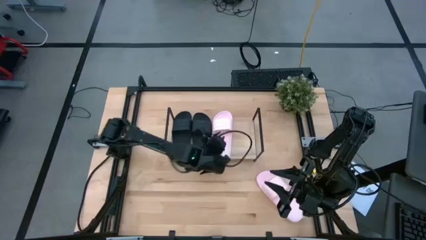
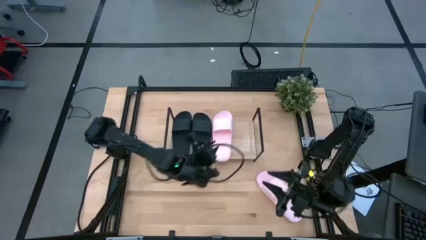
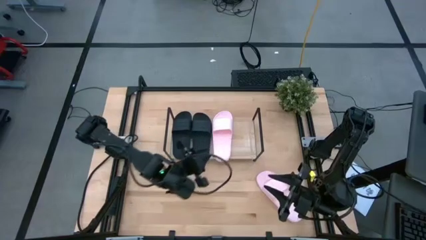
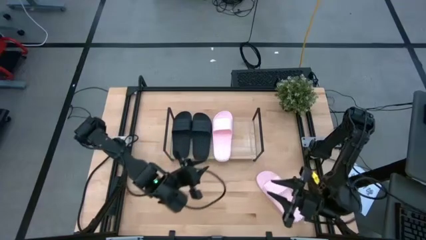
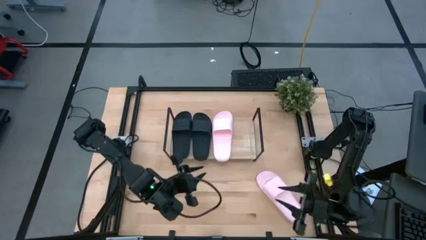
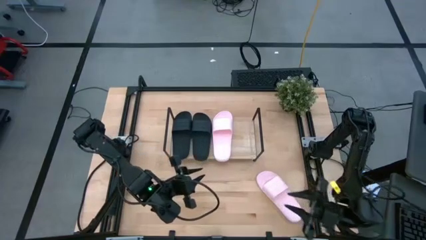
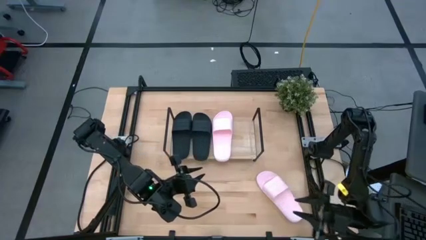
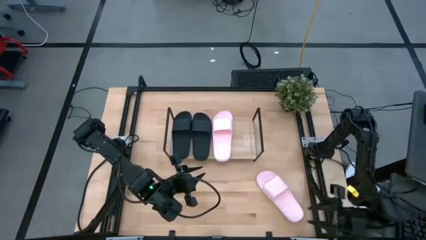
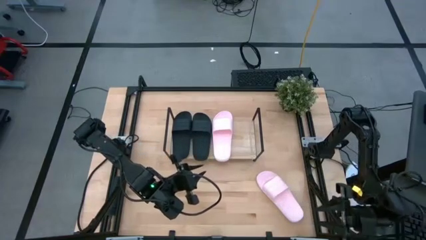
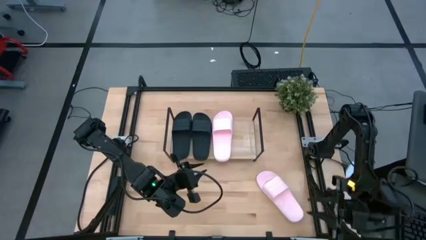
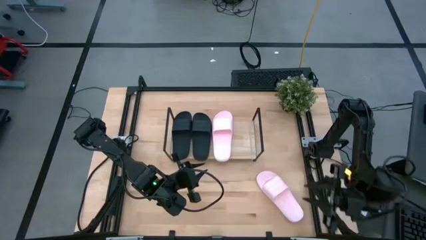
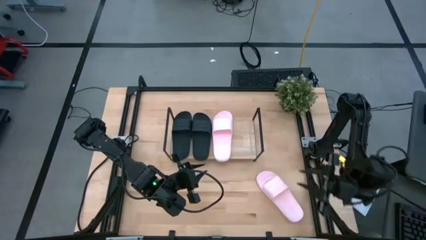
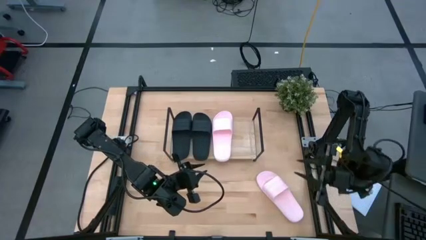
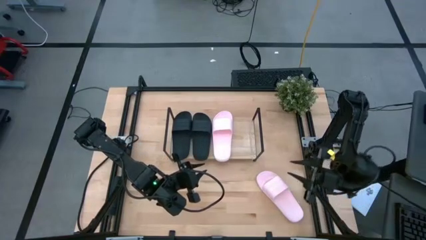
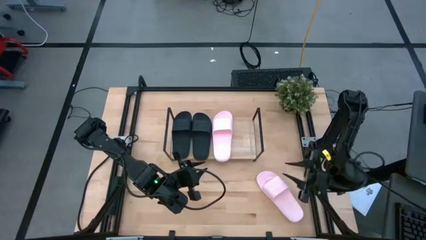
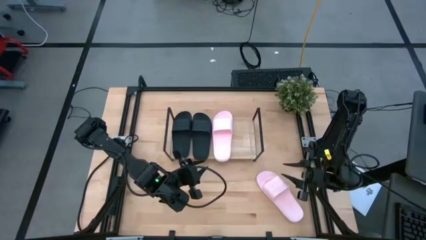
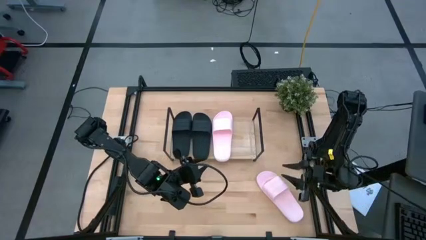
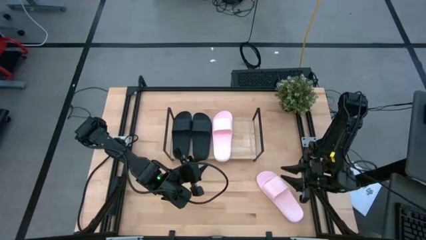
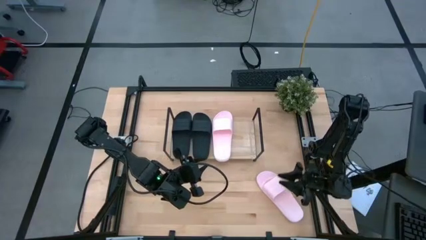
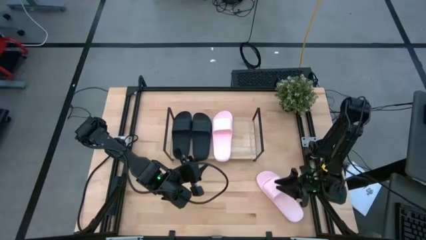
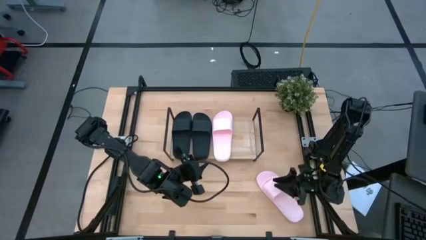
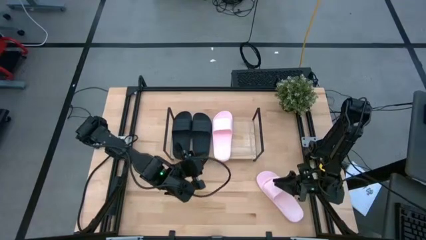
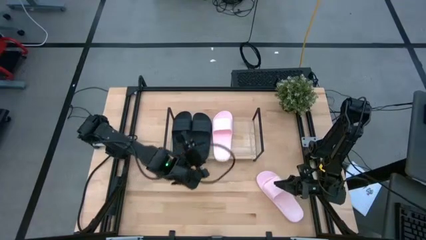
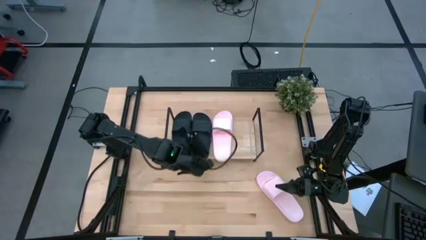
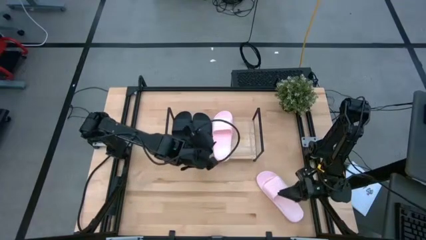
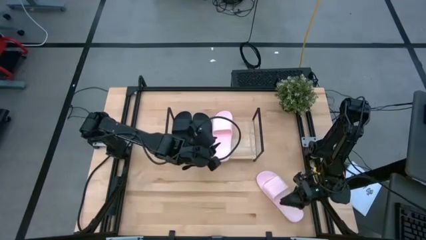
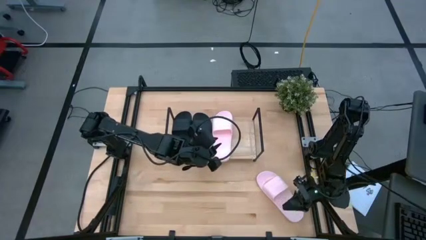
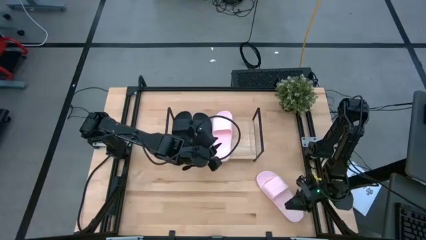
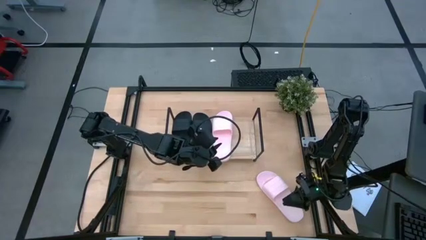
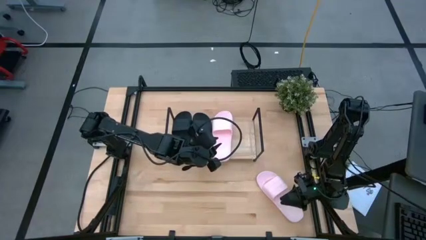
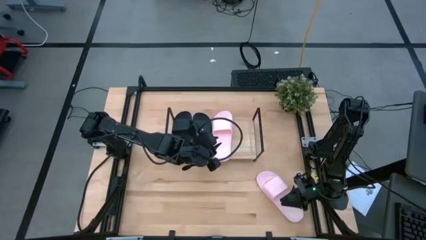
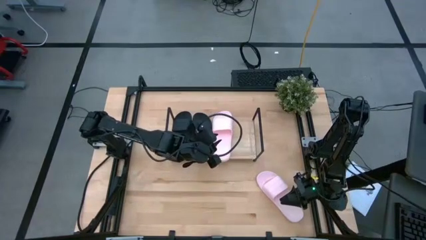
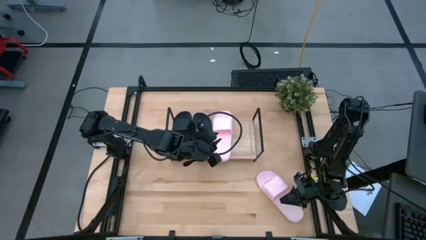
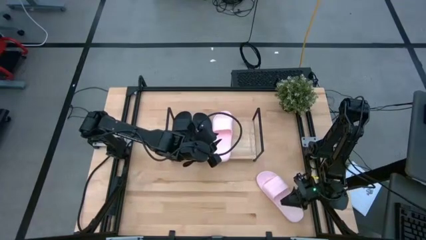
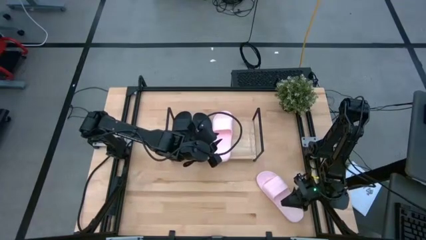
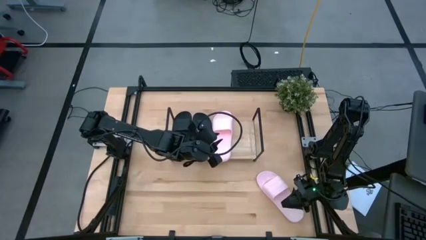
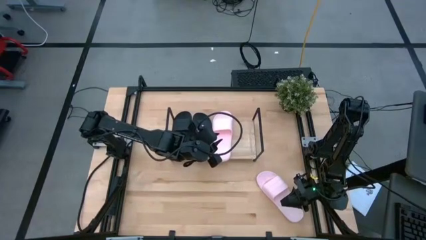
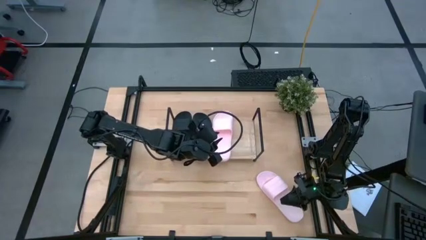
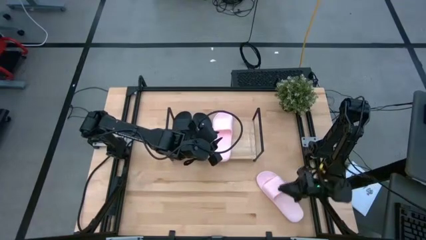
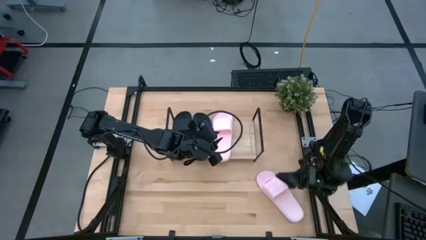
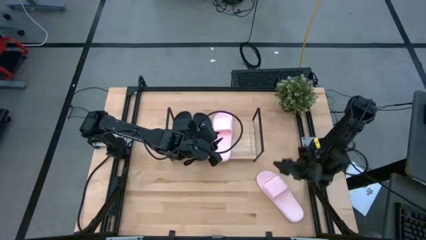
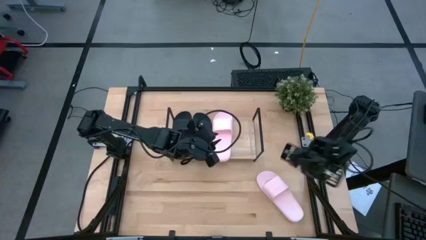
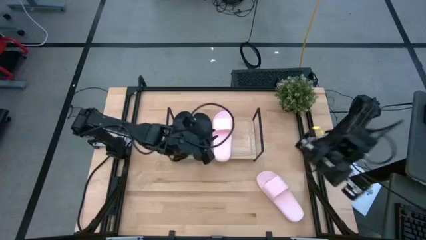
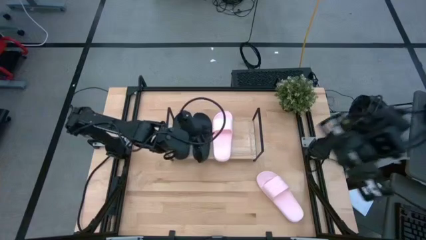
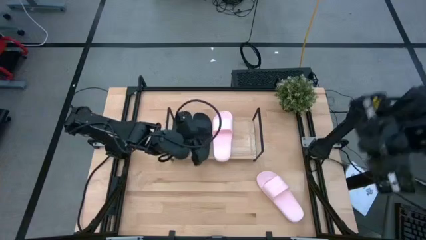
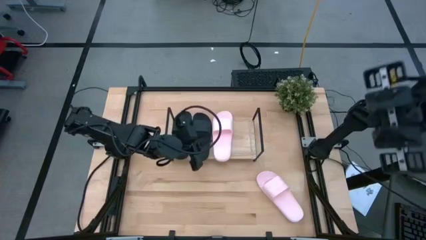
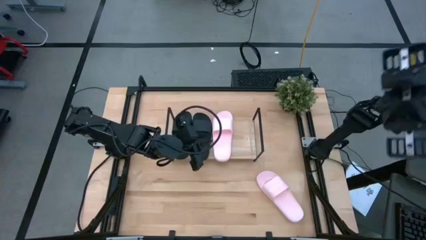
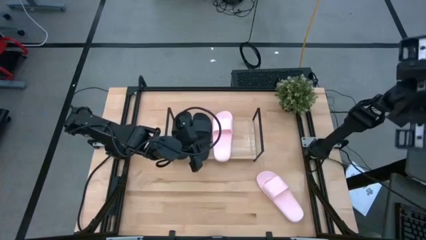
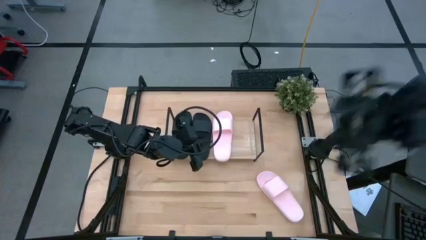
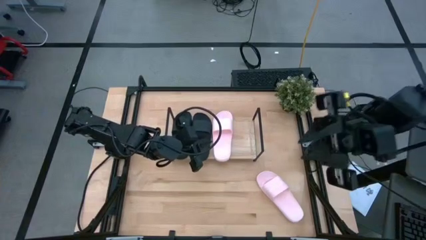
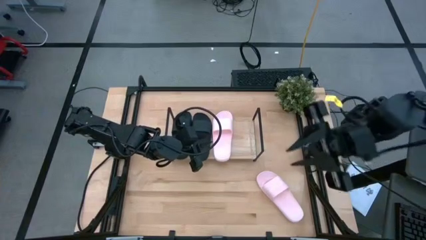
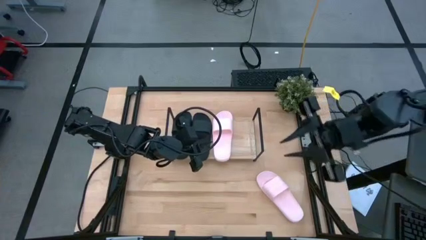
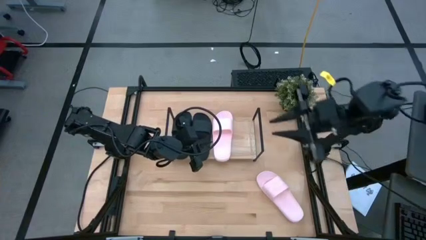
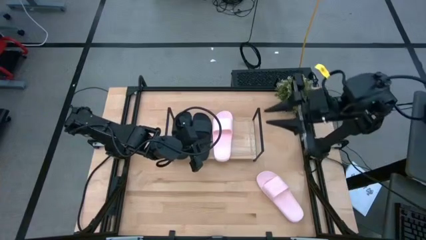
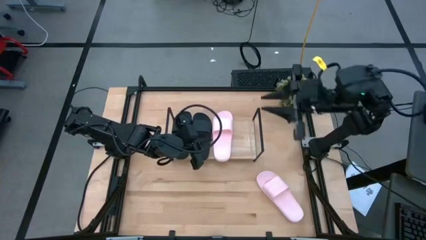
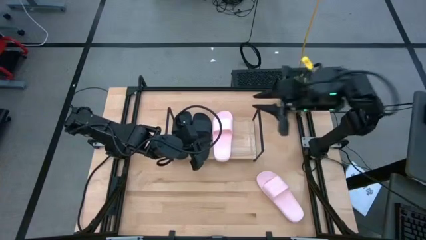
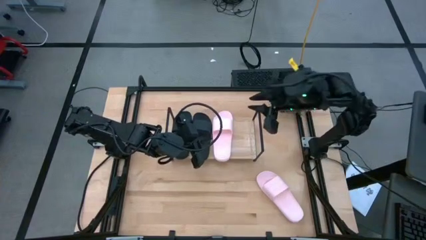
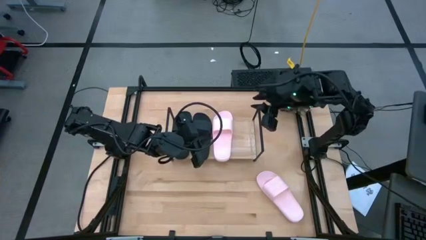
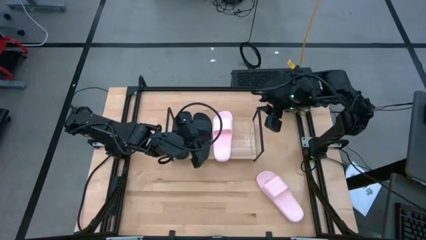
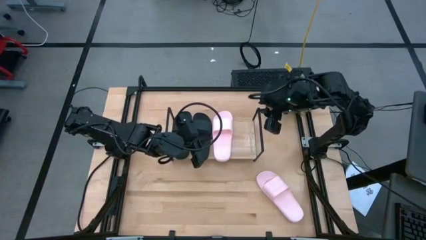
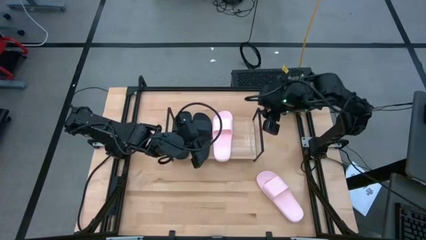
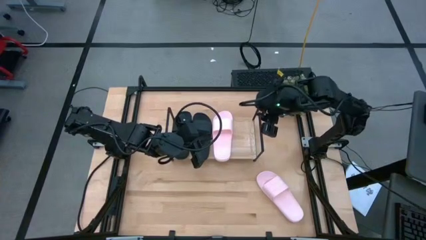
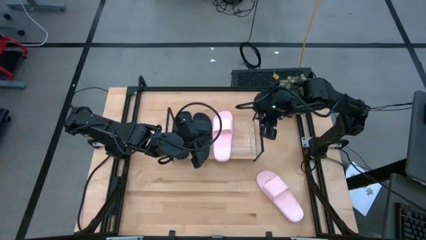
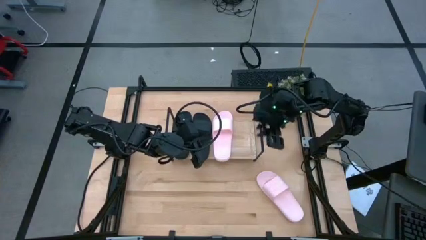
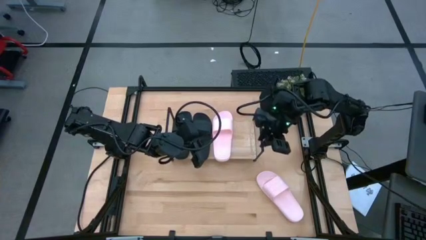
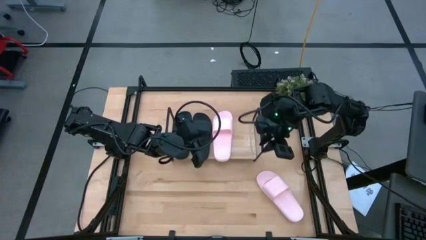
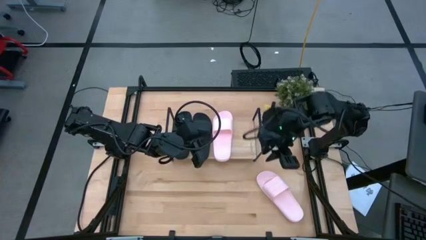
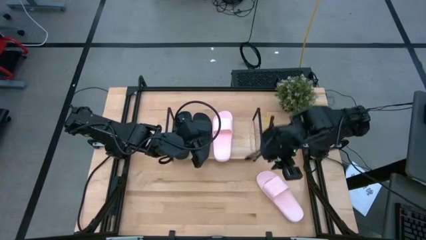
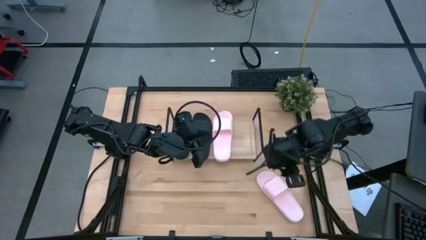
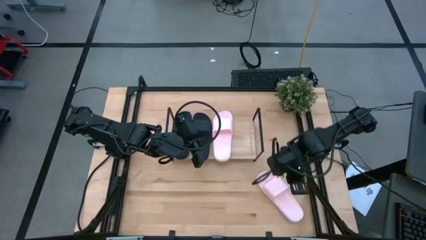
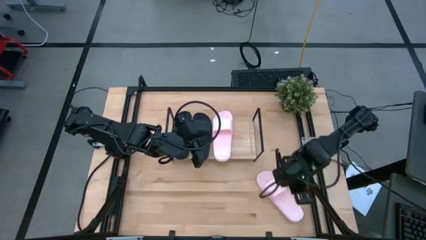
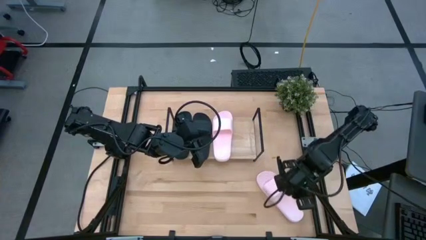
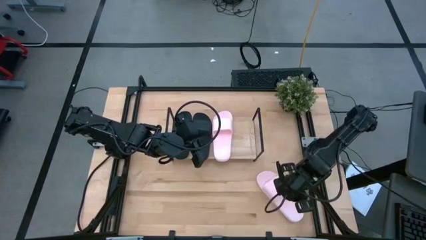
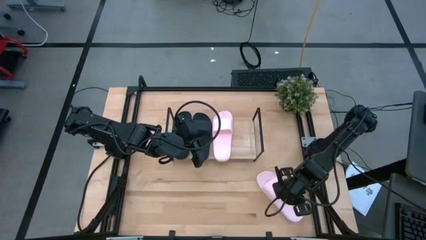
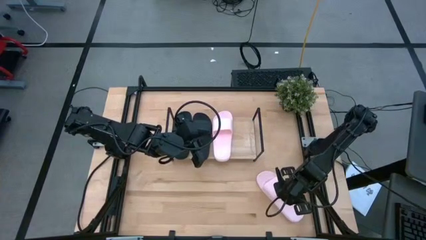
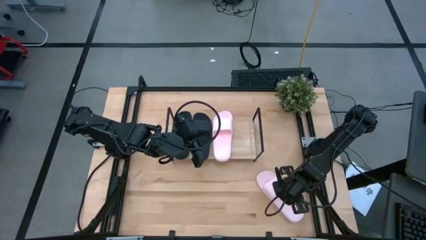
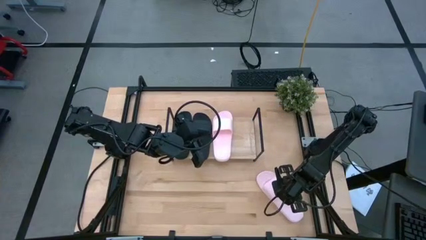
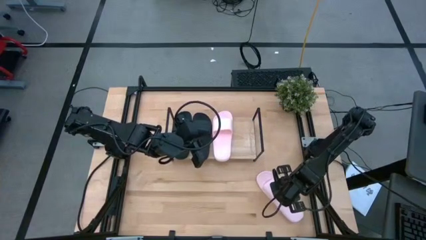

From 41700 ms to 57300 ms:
Task: Pick and place slides into the shelf
Put the pink slipper on the shelf

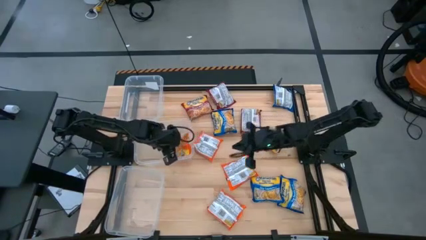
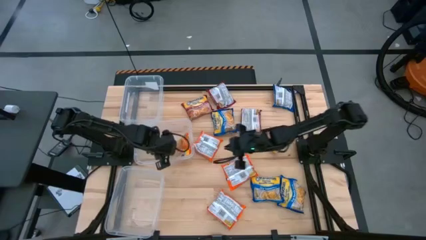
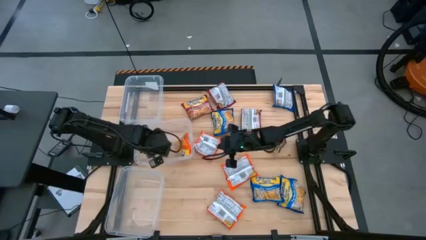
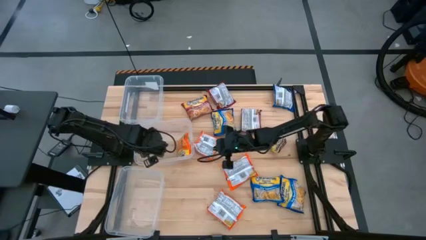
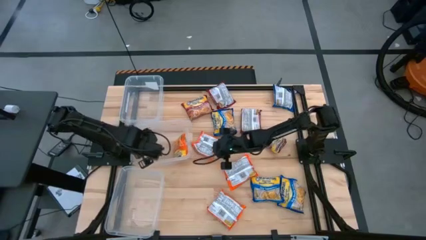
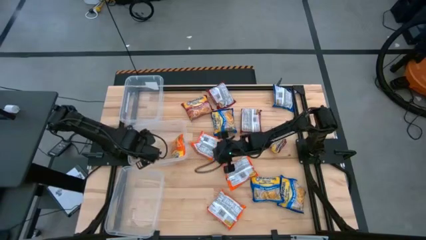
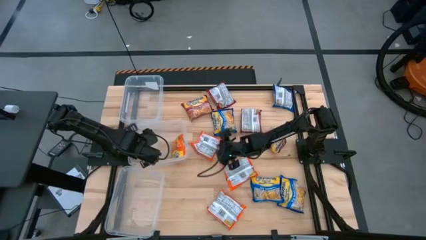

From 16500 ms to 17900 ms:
Task: Sort Maruchan noodles
Adjust the middle transparent bin
